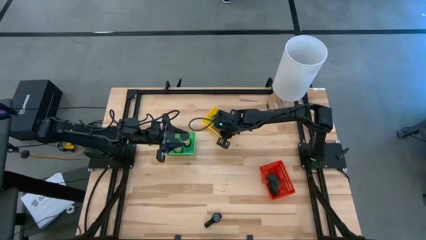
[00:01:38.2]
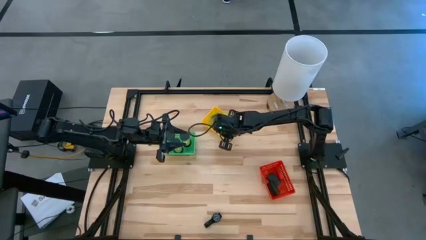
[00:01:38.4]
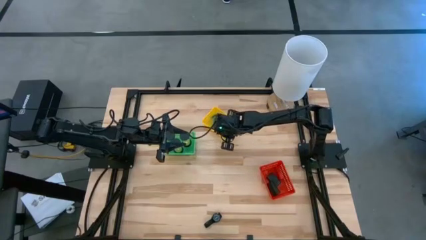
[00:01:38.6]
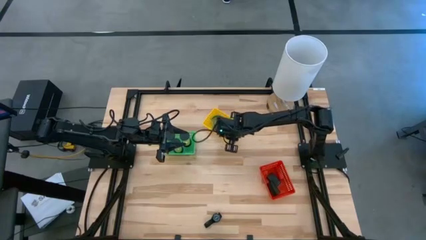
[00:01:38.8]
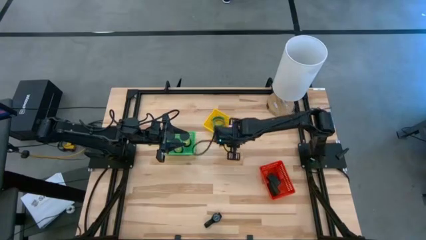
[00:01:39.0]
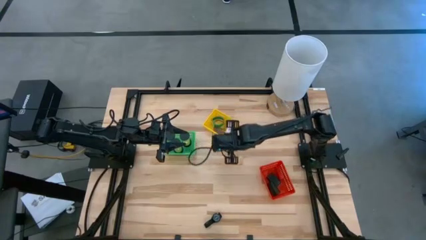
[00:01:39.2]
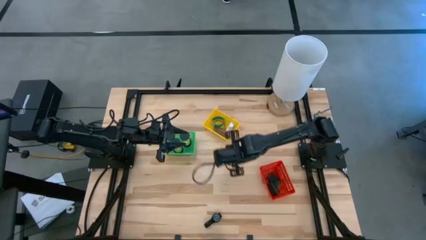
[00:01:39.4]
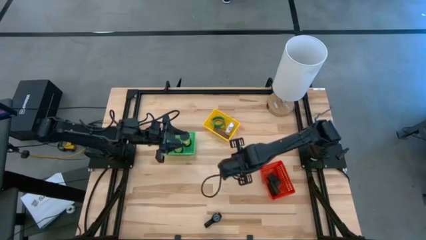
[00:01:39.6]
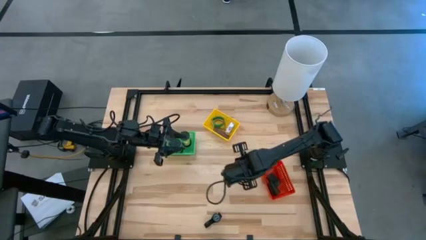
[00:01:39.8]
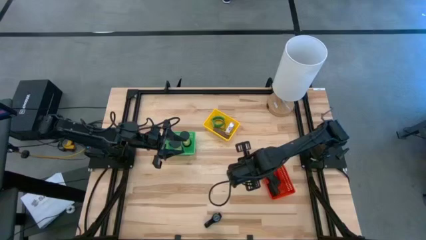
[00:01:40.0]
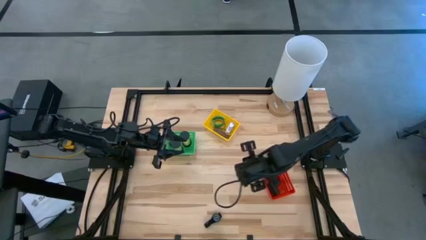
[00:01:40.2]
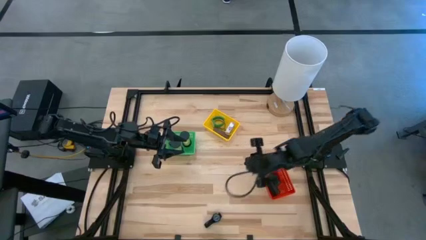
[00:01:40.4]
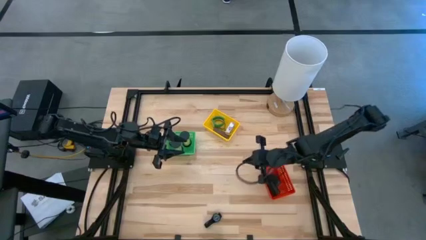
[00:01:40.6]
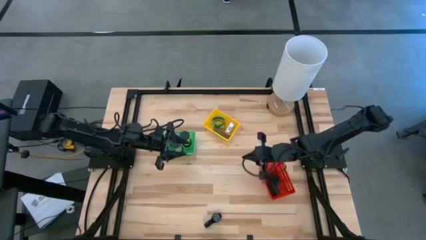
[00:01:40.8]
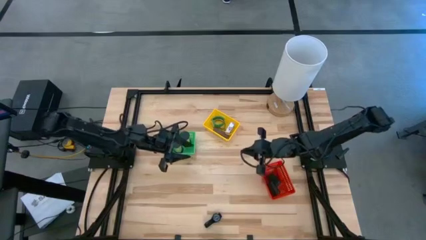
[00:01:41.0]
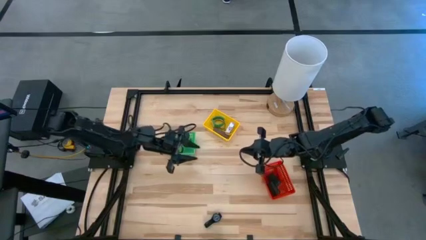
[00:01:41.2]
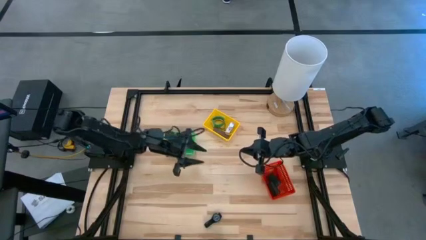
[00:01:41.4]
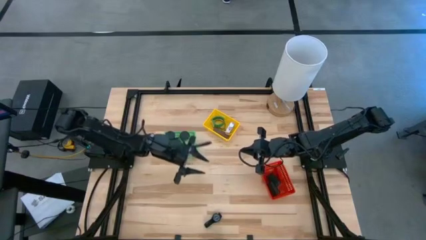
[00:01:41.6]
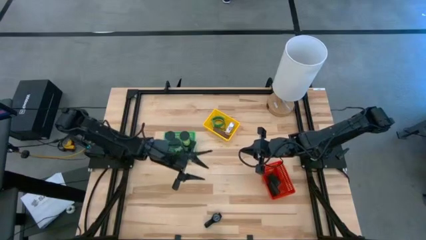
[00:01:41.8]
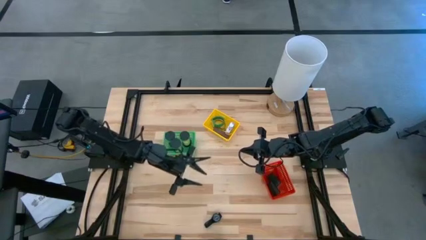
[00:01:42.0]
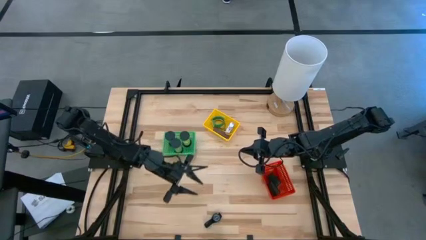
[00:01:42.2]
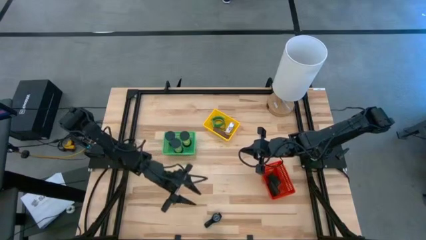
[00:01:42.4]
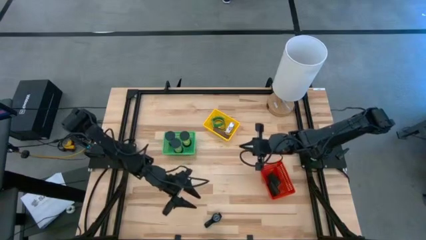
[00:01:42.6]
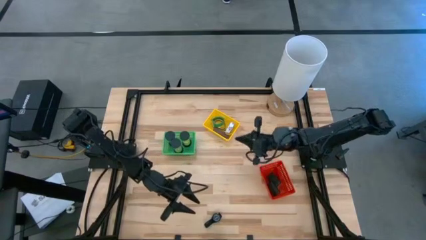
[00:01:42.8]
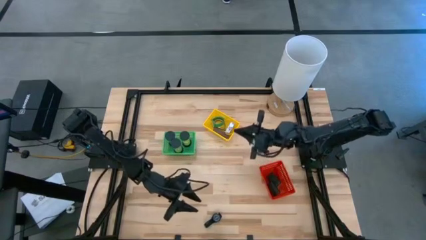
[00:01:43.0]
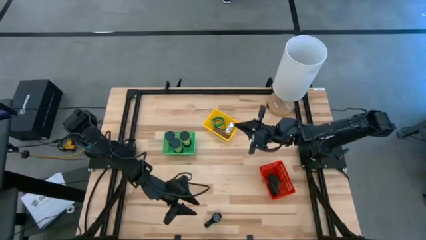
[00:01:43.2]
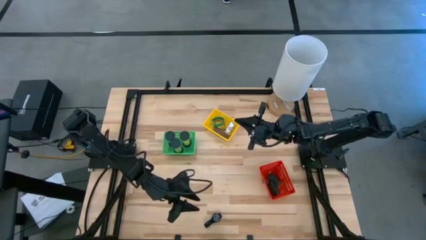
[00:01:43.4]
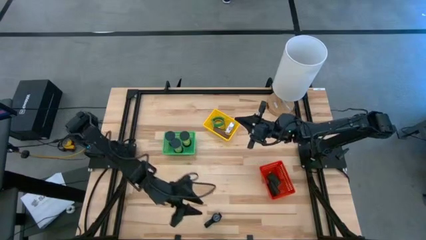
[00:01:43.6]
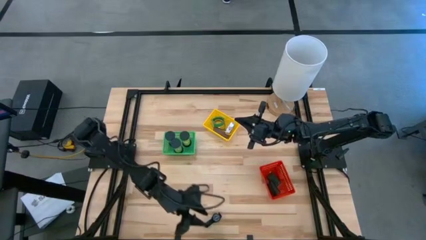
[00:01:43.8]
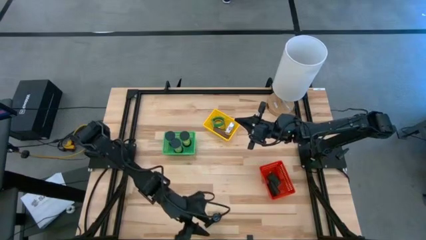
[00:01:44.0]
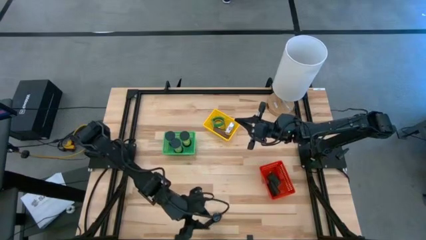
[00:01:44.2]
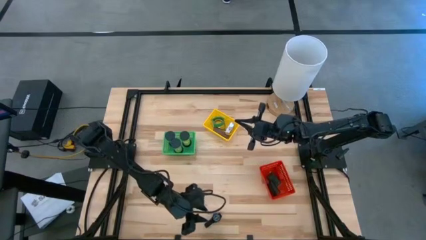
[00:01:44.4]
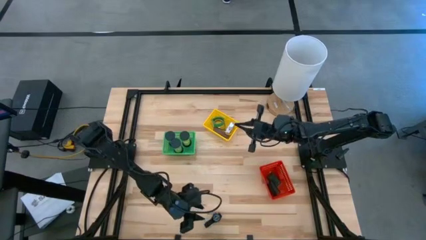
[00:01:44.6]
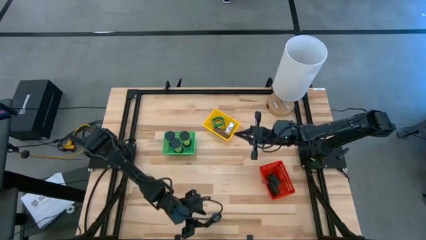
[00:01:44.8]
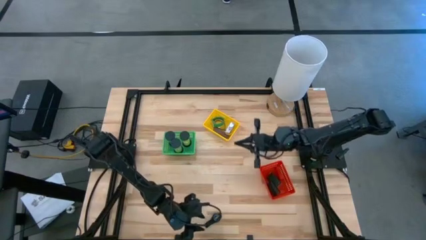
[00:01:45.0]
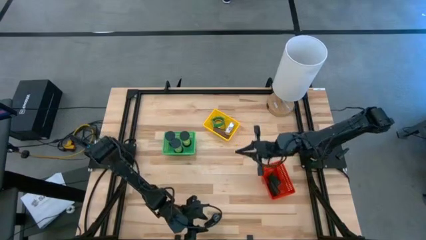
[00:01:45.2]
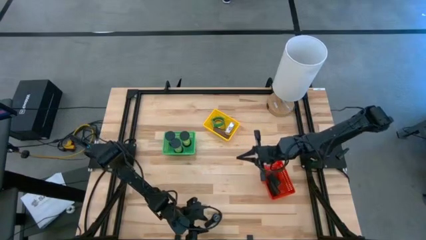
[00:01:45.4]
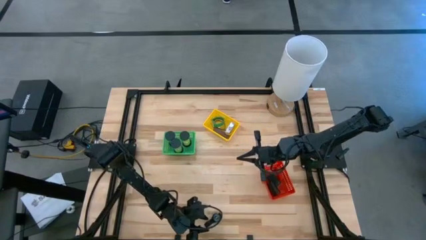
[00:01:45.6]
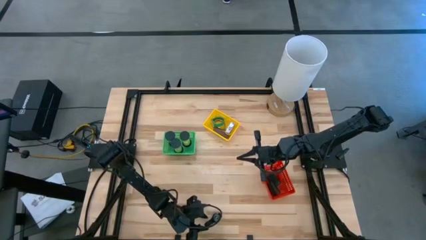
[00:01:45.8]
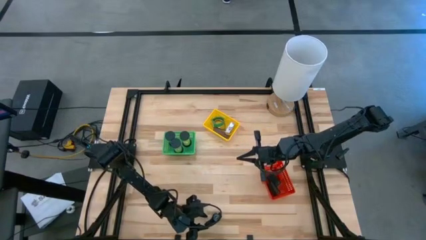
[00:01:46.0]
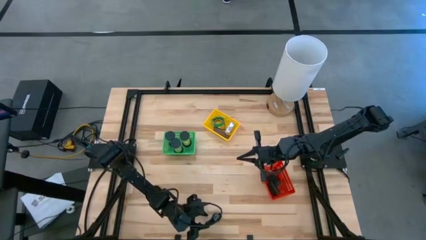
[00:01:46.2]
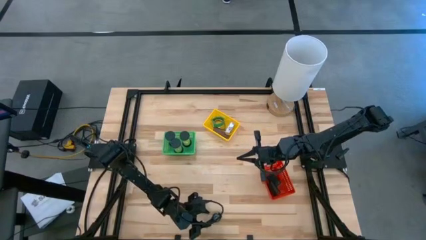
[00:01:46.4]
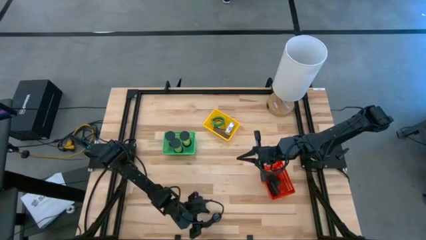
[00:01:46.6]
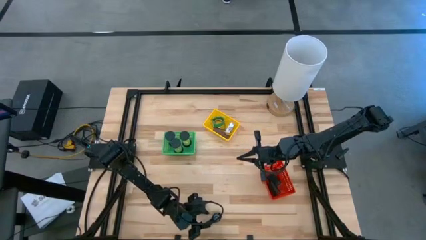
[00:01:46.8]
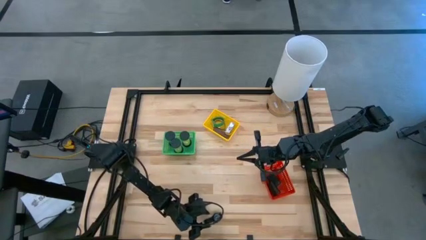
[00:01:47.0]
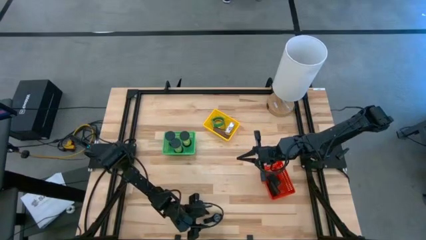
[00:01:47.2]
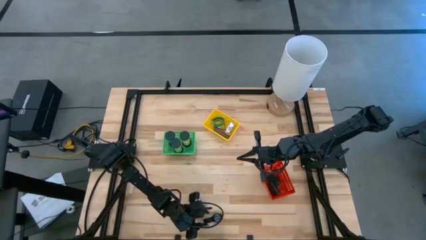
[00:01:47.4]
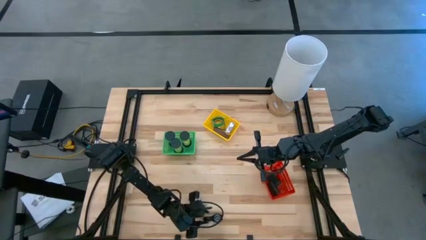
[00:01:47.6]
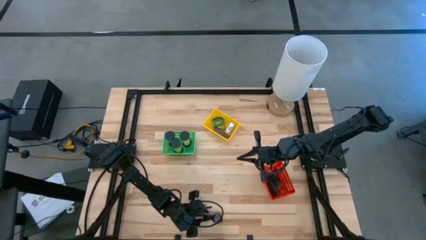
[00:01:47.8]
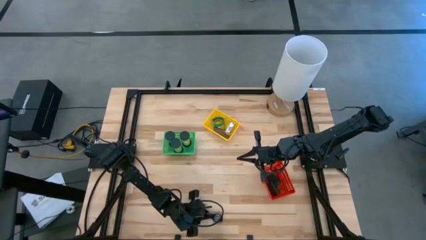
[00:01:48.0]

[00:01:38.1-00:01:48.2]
Task: Pick & Place Office items
Put the black watch into the yellow basket

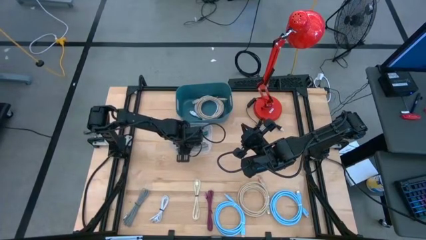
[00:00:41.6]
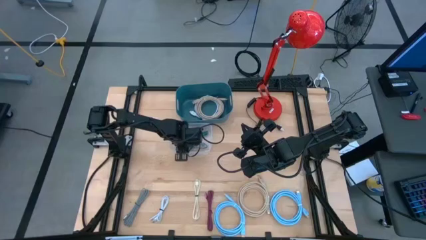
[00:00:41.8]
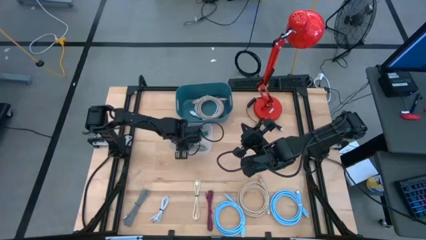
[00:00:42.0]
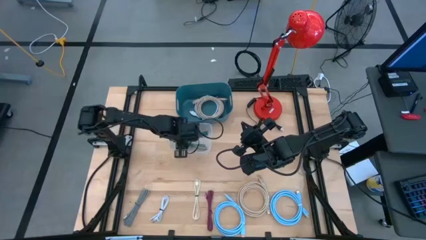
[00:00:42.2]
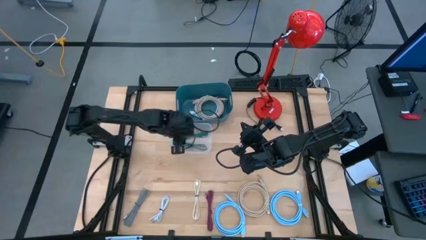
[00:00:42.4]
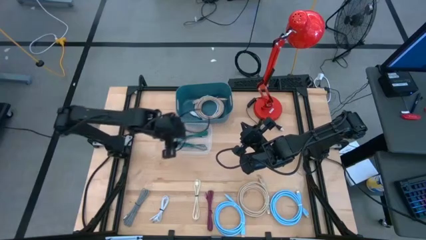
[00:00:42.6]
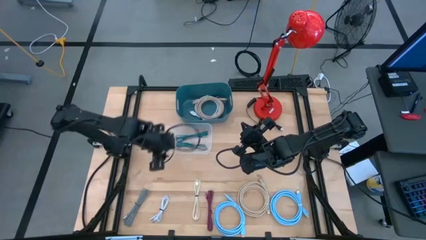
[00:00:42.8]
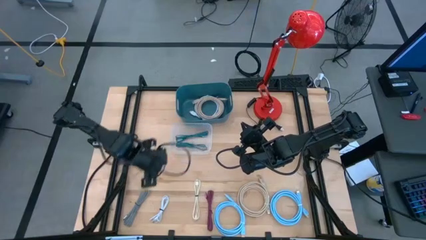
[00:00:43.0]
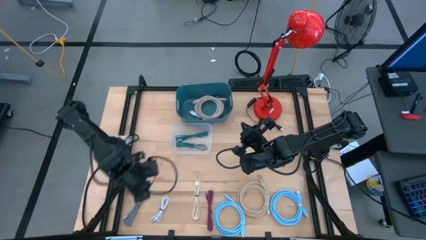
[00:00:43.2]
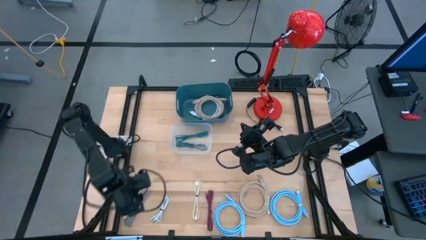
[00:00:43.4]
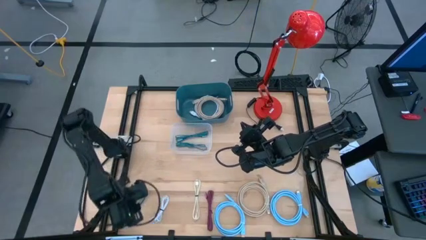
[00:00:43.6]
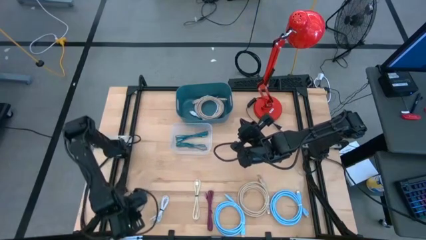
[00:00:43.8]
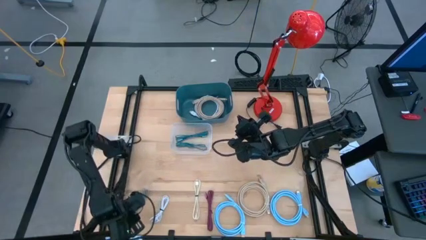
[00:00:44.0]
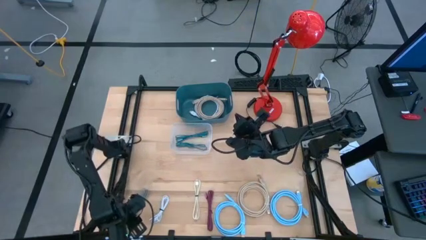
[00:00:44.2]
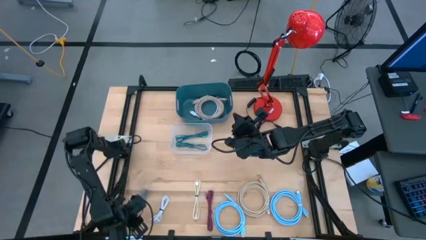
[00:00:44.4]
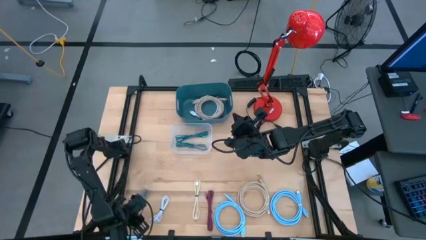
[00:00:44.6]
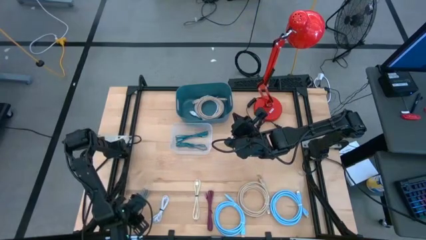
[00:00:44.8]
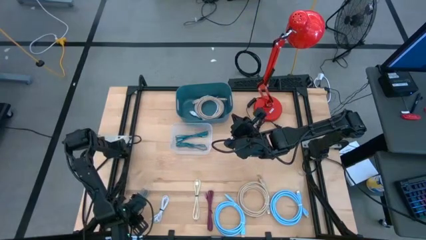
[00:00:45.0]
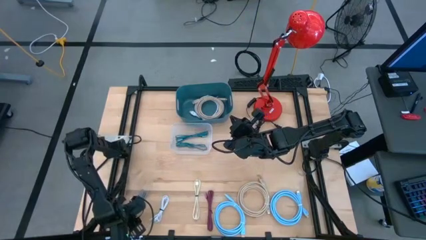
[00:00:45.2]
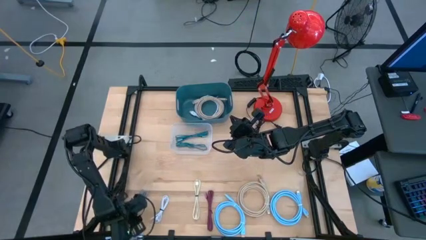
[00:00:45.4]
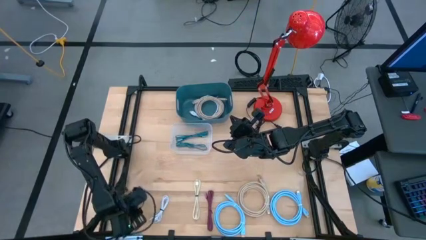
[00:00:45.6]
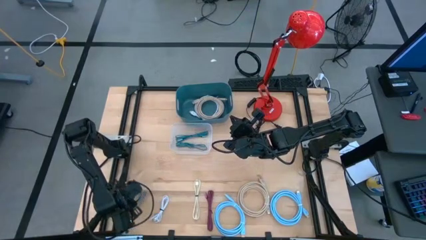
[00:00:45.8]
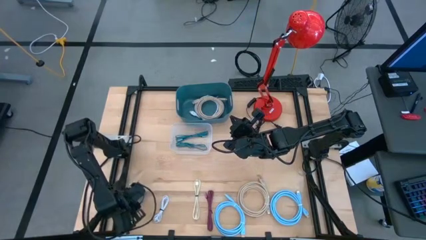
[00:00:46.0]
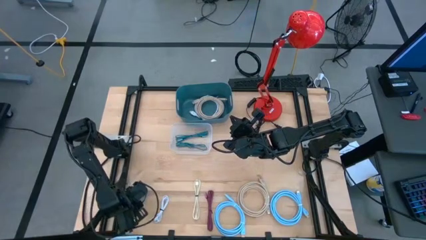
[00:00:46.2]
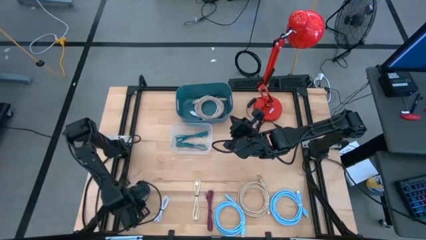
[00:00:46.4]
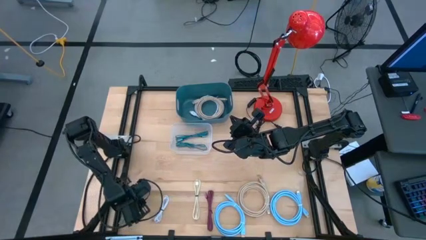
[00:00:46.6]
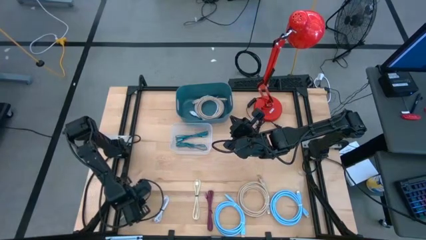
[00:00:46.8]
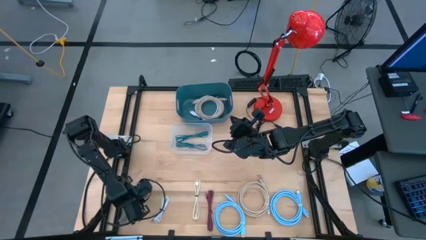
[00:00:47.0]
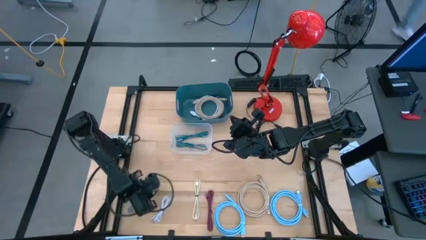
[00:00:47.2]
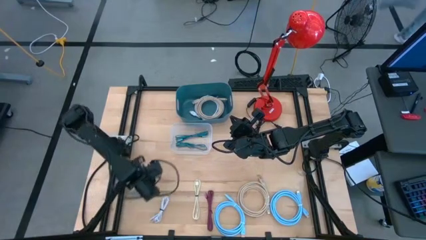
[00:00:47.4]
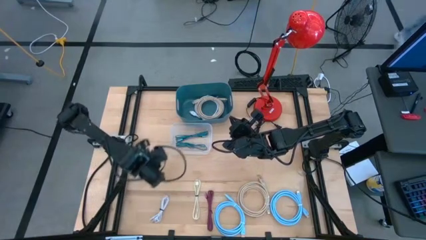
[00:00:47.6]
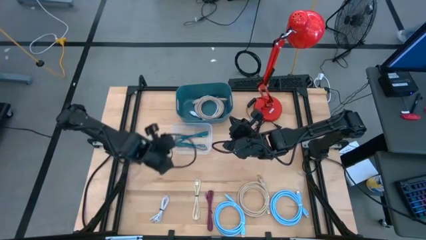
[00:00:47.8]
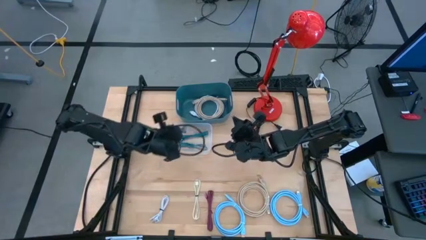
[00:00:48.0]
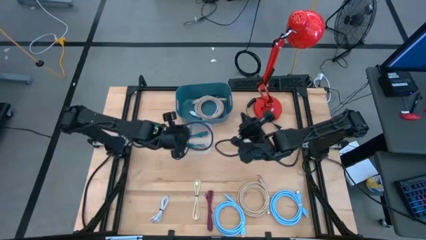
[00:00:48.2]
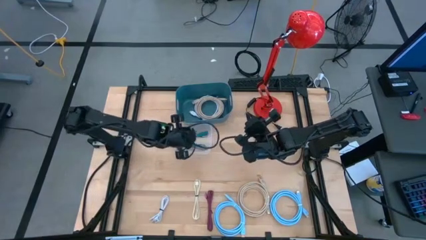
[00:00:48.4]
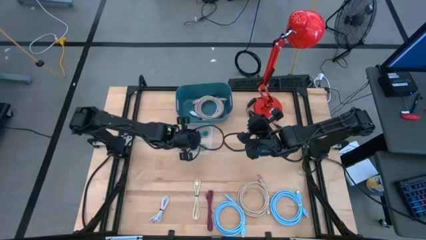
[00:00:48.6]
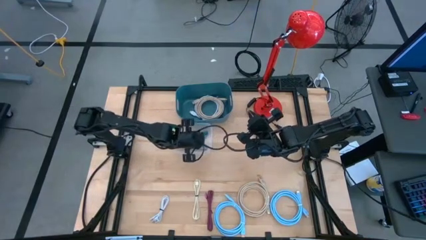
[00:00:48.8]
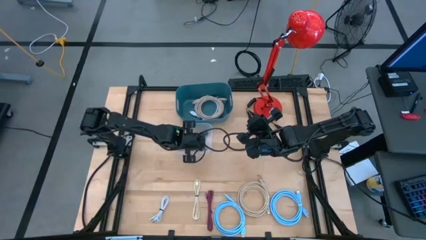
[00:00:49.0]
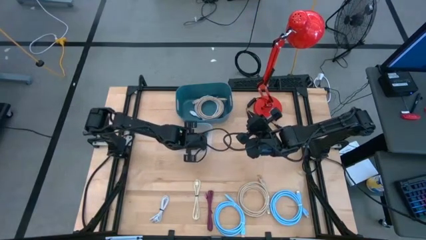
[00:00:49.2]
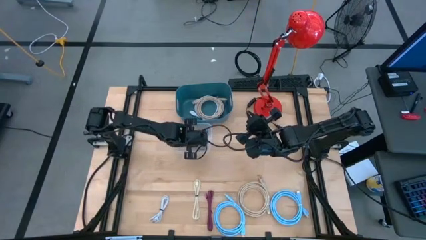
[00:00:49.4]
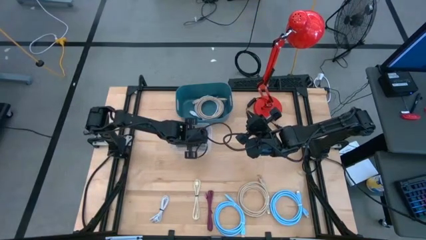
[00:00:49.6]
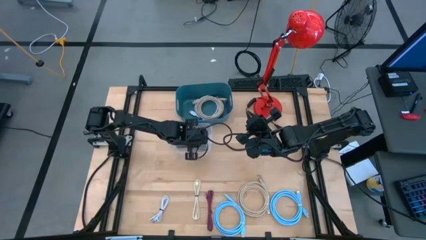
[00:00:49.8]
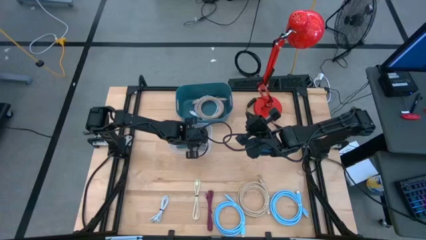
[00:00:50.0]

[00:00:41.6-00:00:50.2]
Task: Pick & Place USB Port
Put the black and white charger cable into the transparent bin
